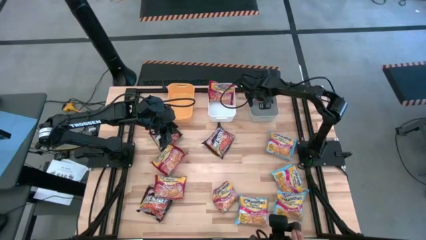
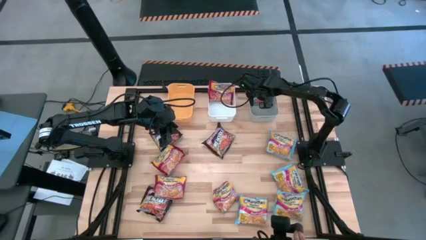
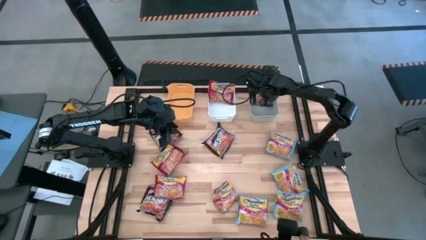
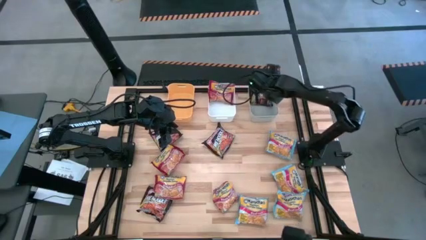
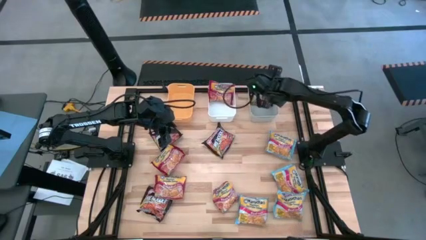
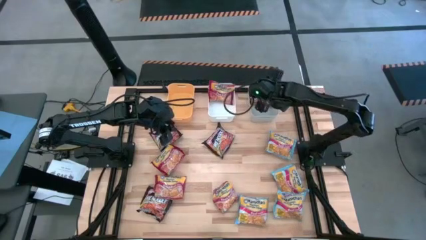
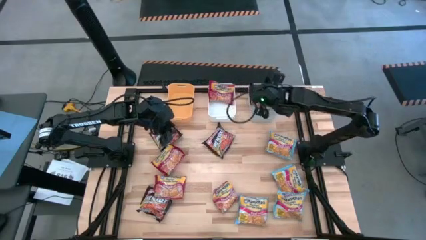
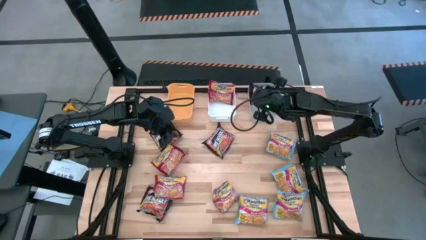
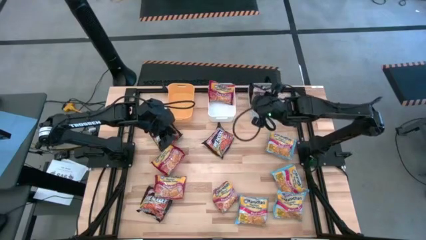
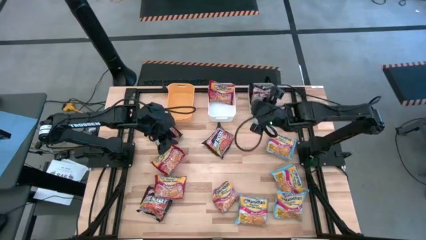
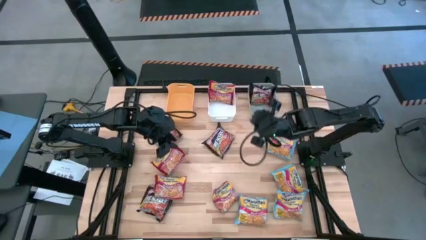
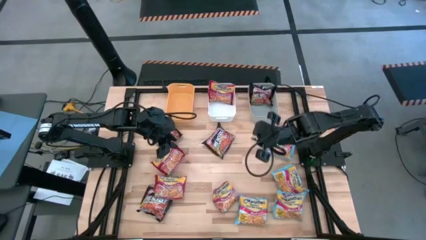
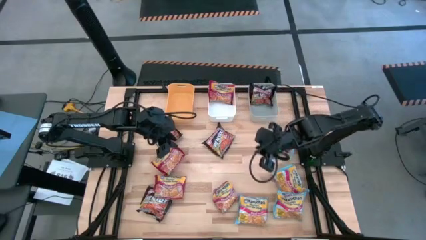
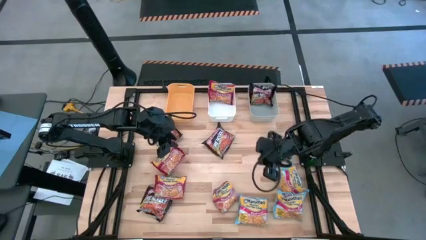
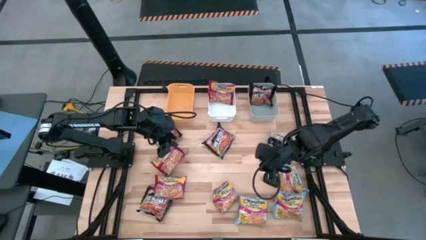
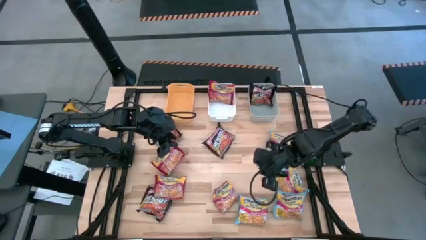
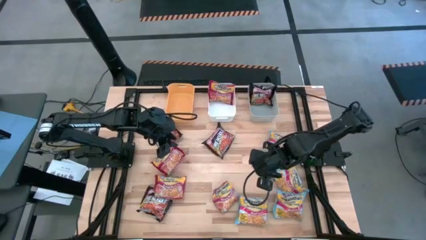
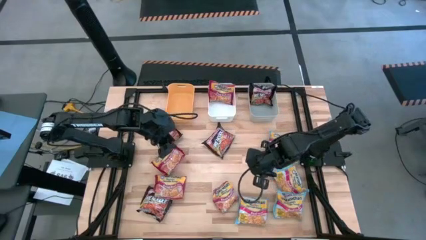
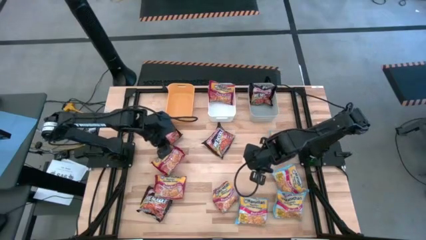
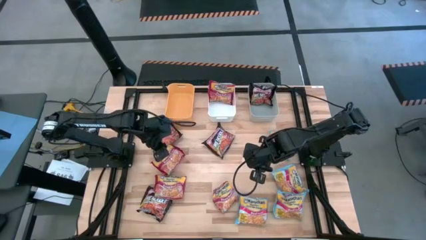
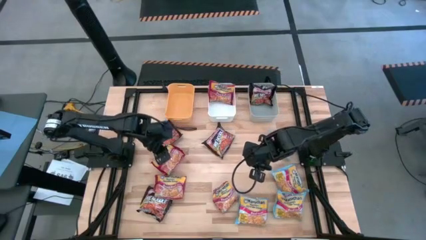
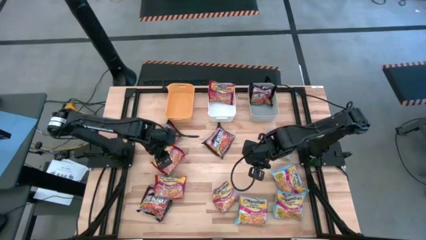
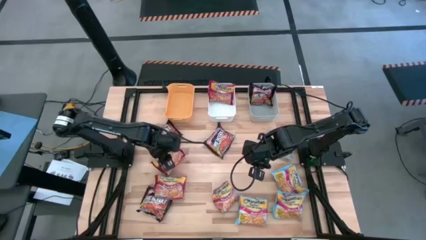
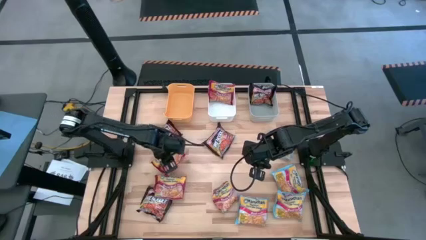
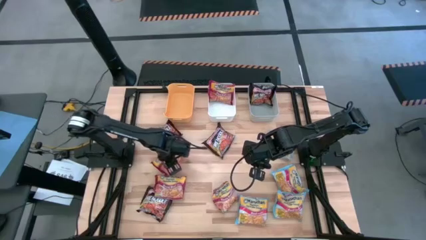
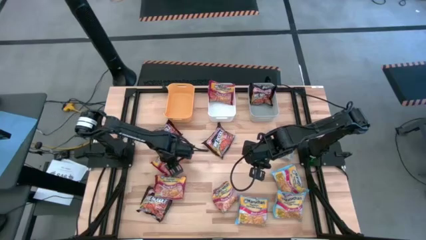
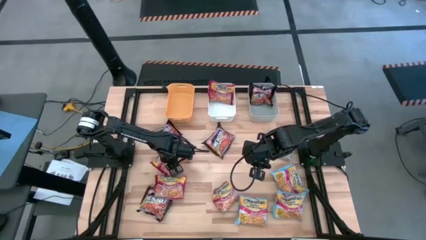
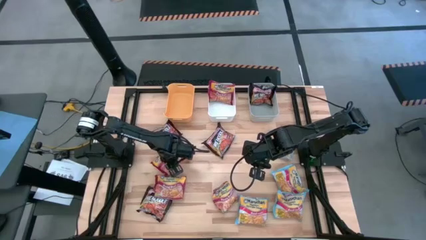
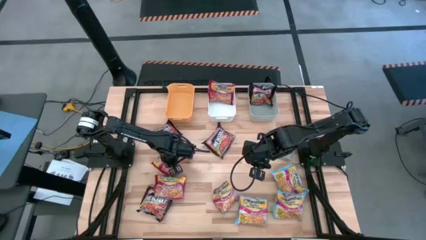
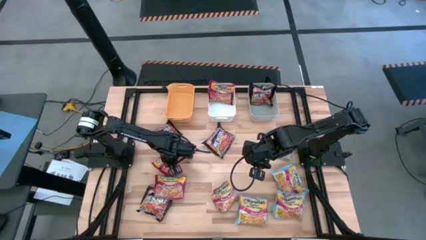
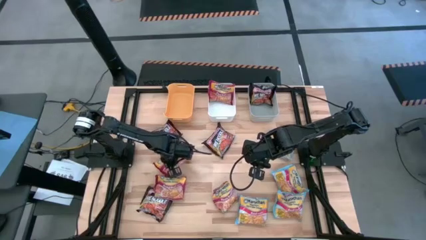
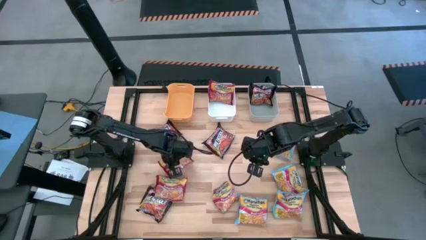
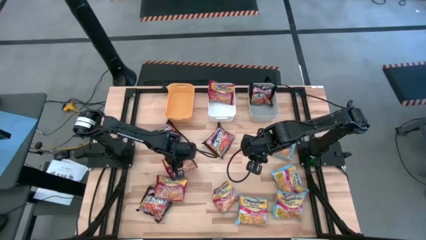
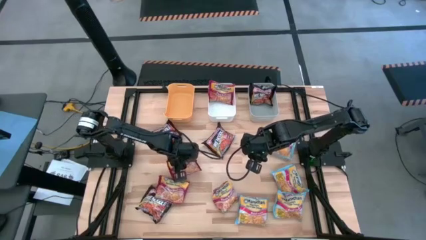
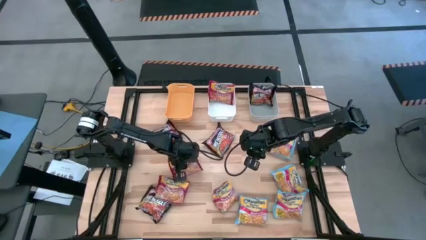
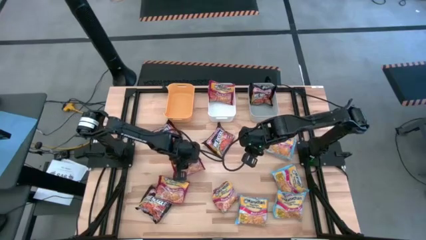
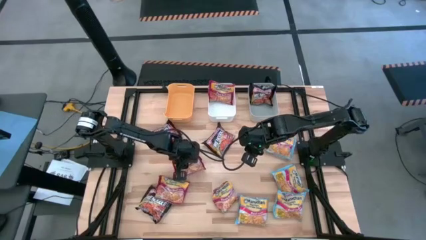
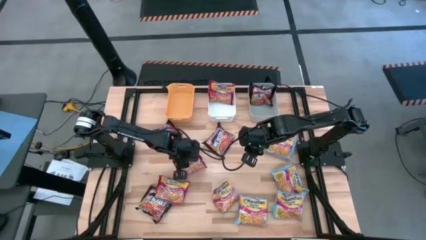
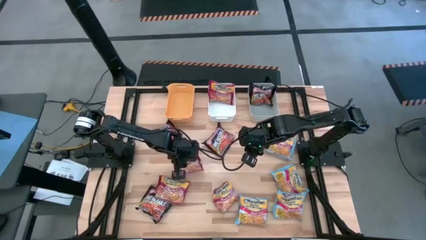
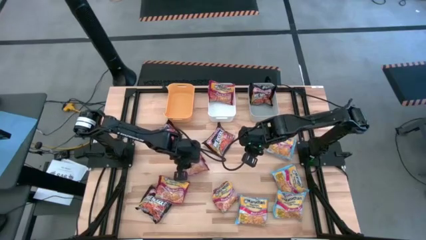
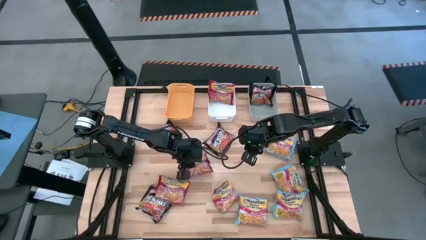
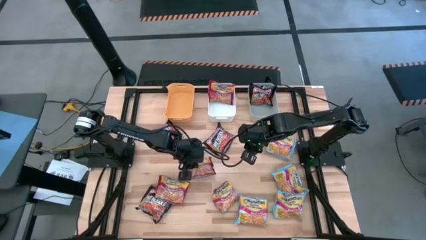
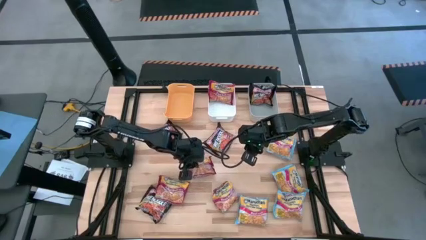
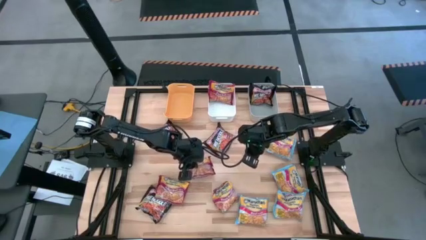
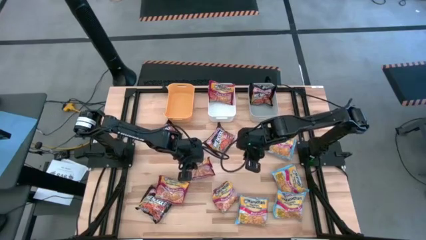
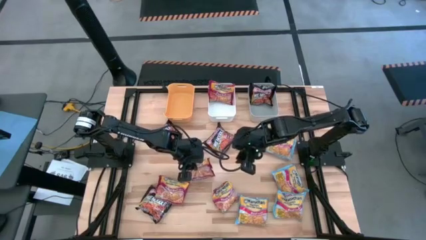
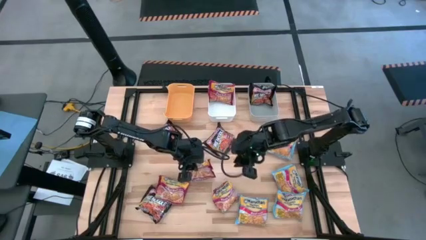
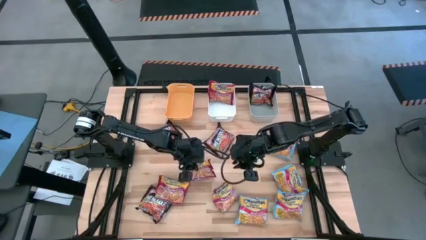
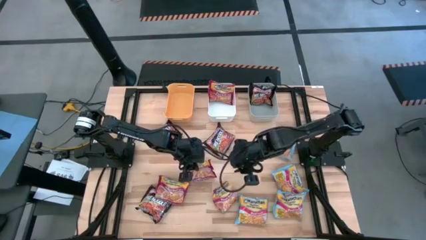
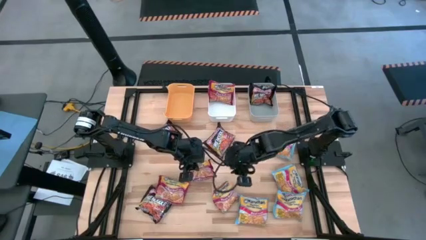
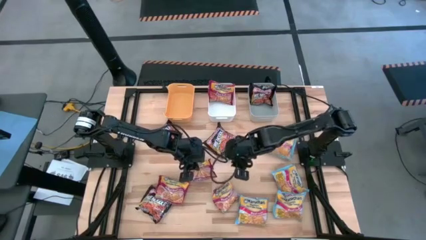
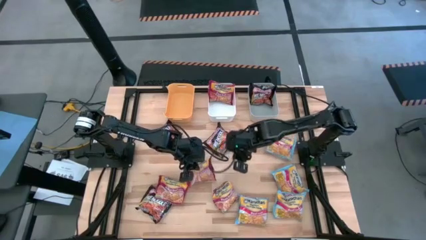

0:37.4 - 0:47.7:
Task: Sort Maruchan noodles
Put the red noodle pack into the white bin

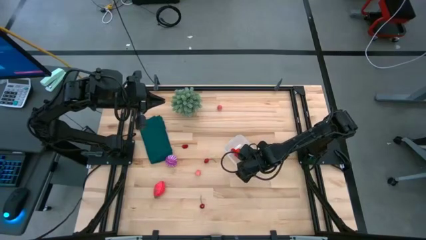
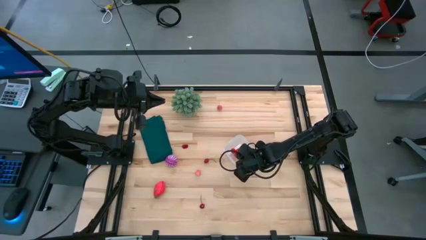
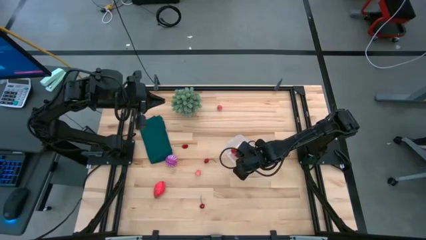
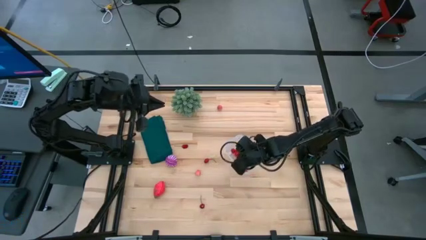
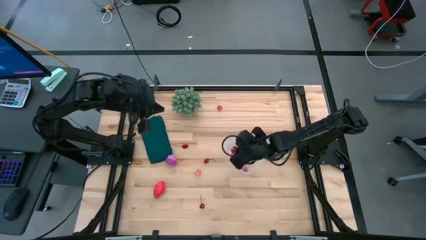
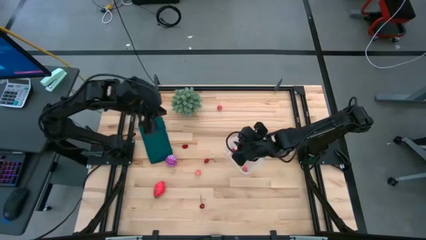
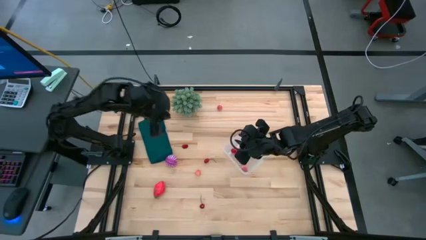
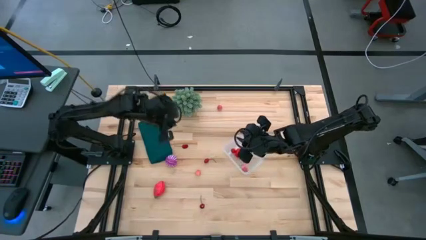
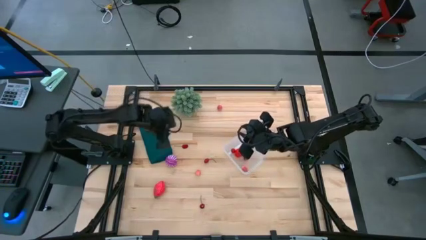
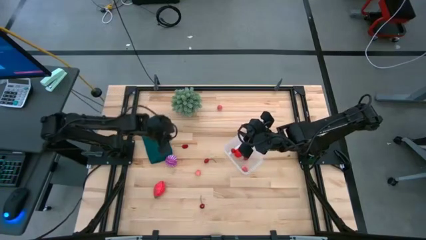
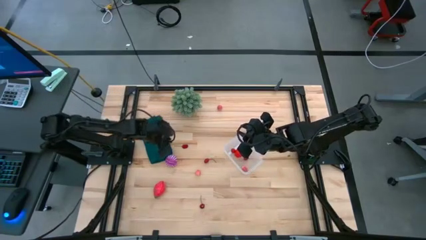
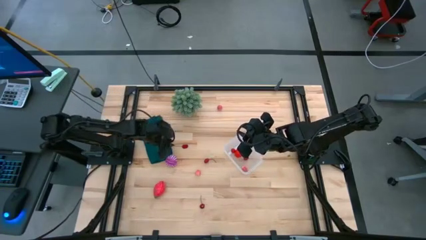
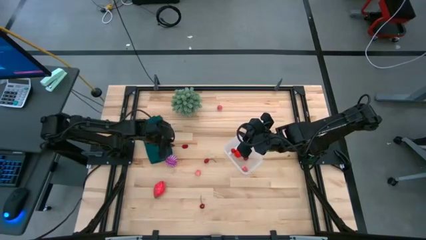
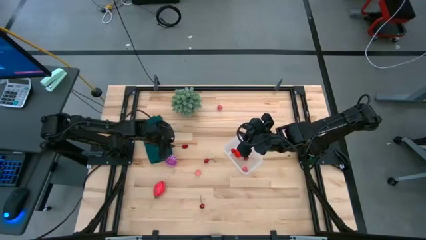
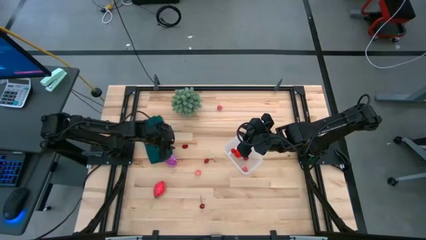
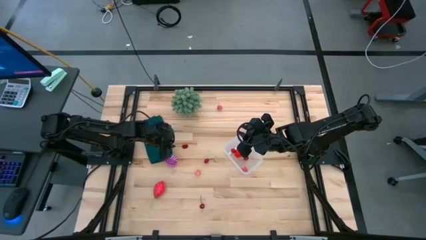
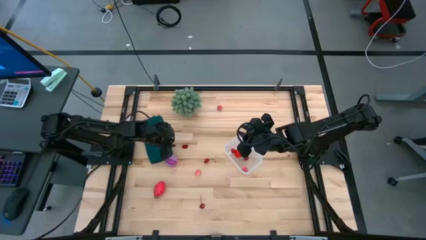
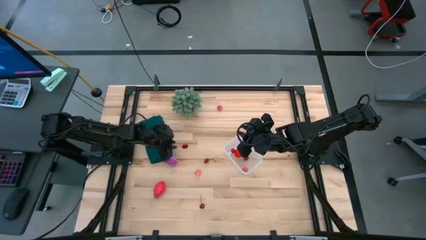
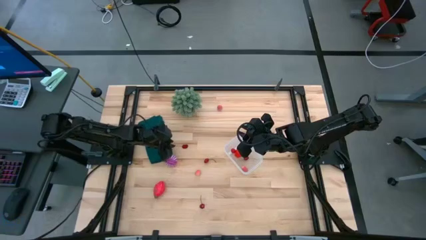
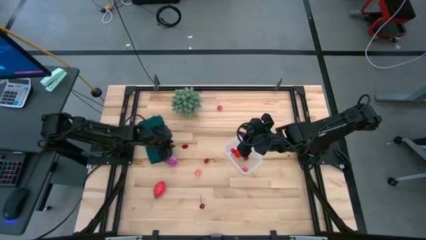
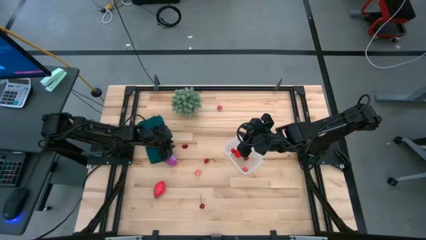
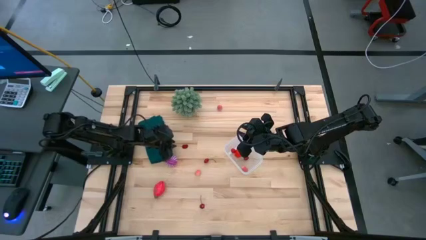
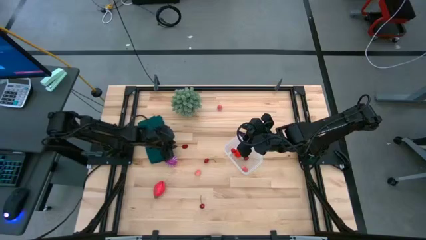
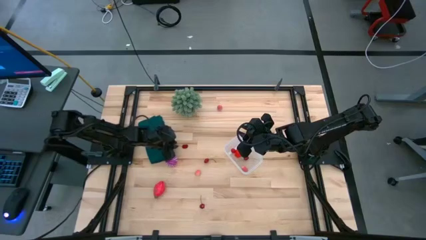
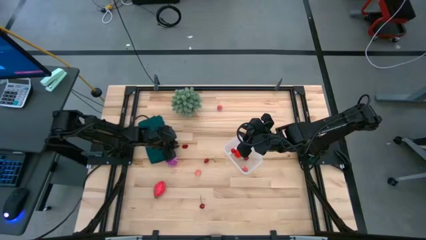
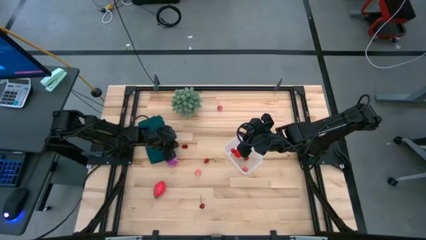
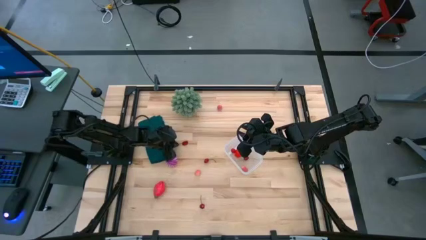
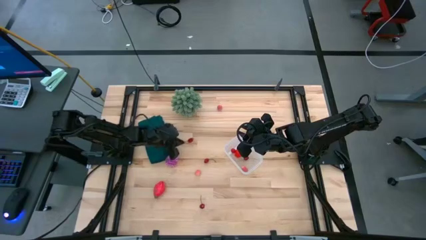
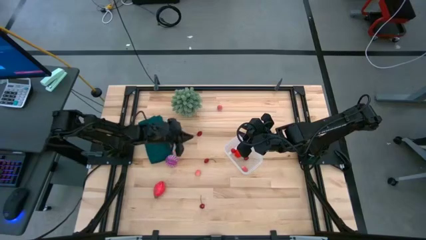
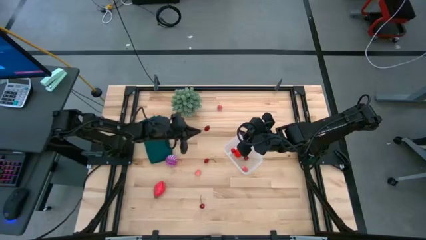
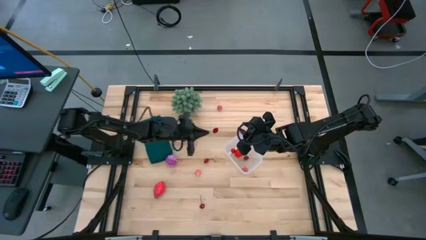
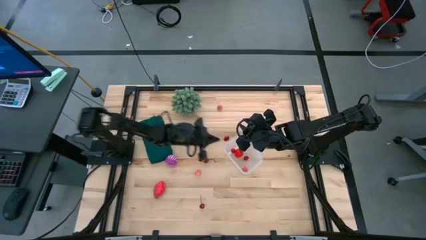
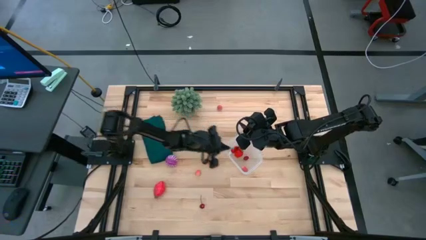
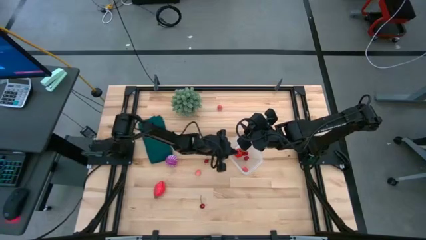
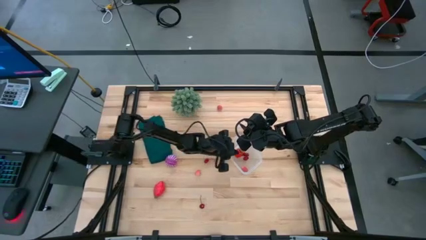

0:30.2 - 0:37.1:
Task: Pick and placing Produce into tupperware
Put the cherry into the transparent bin
